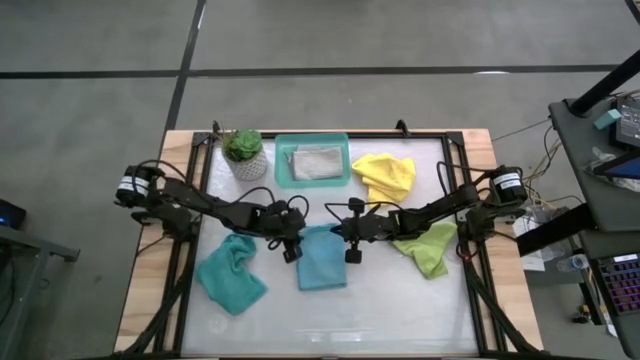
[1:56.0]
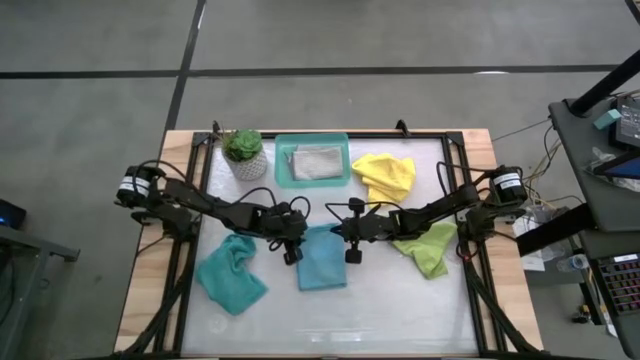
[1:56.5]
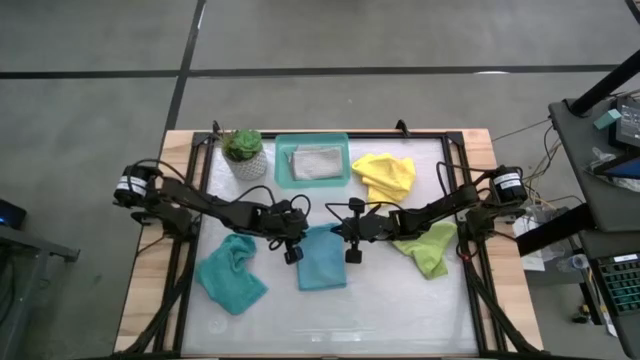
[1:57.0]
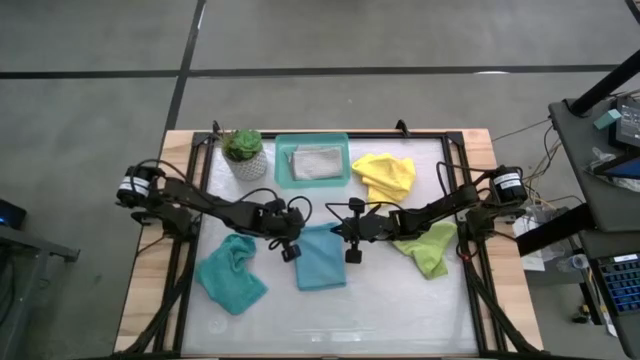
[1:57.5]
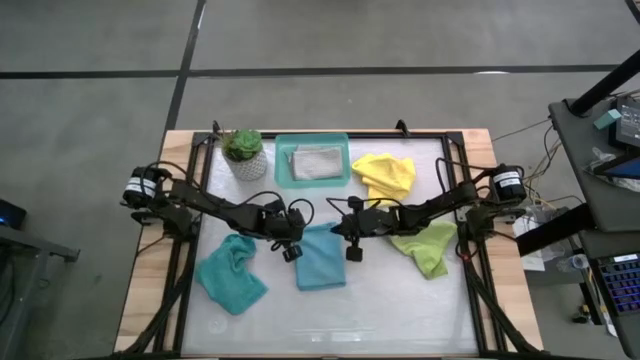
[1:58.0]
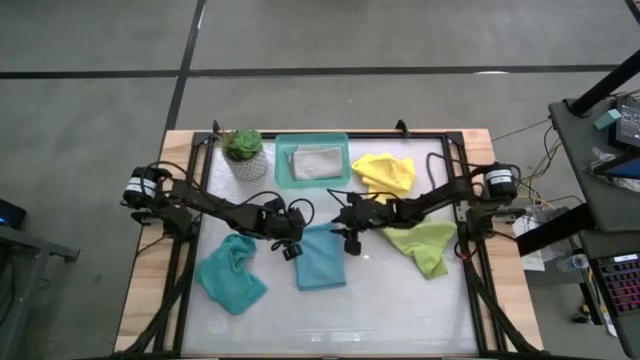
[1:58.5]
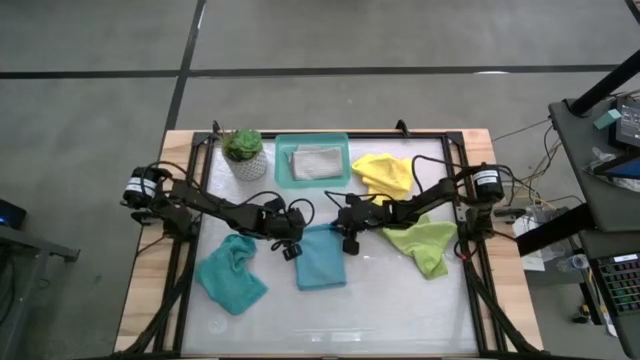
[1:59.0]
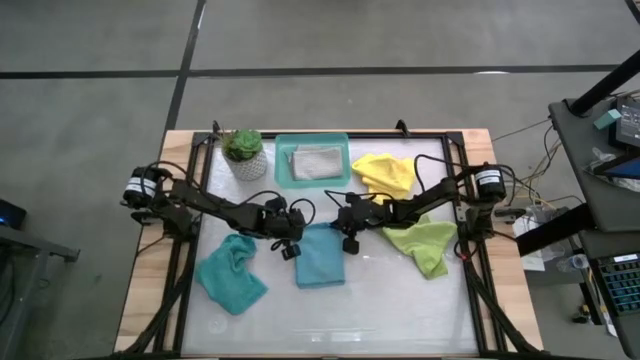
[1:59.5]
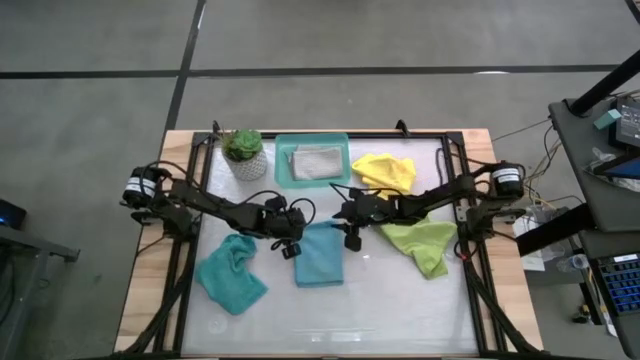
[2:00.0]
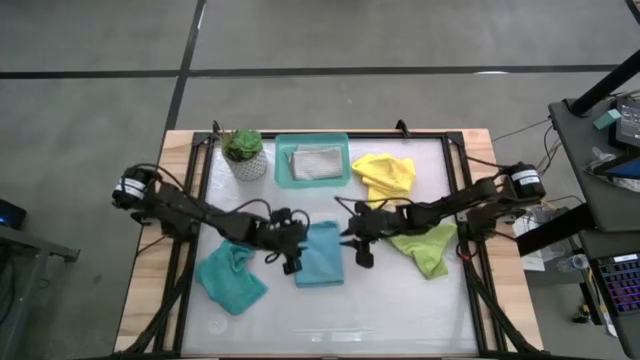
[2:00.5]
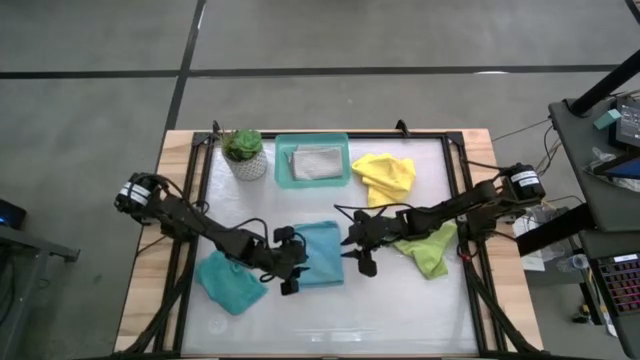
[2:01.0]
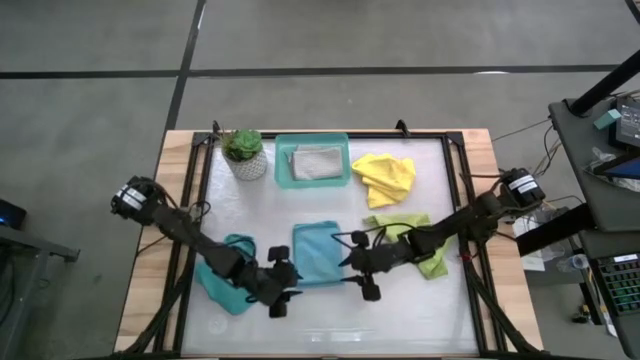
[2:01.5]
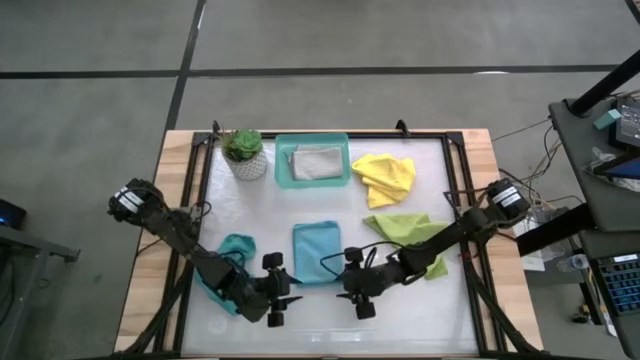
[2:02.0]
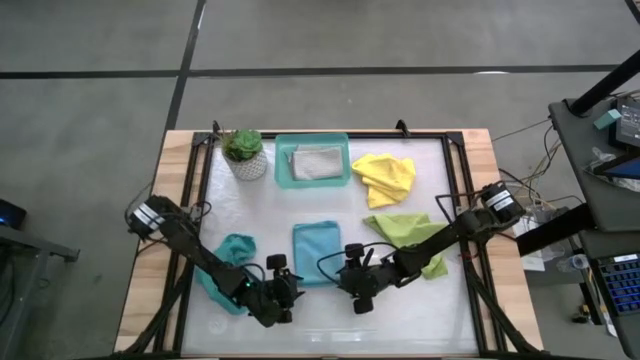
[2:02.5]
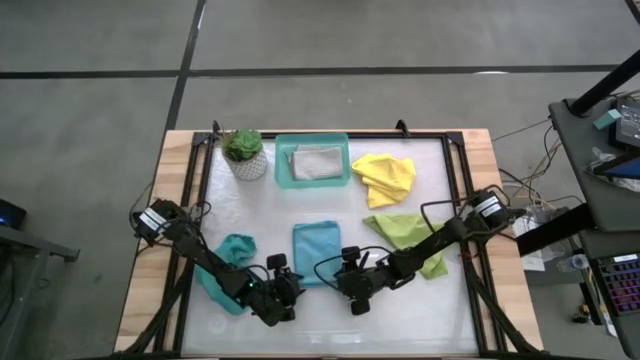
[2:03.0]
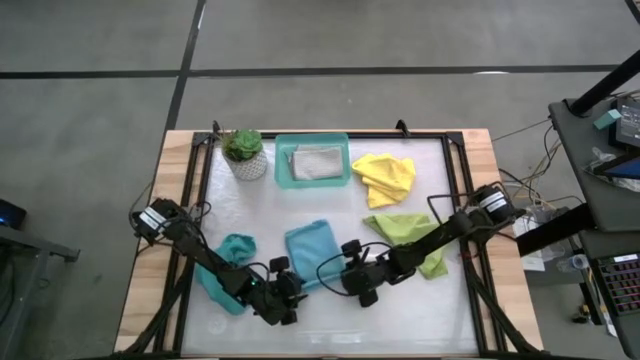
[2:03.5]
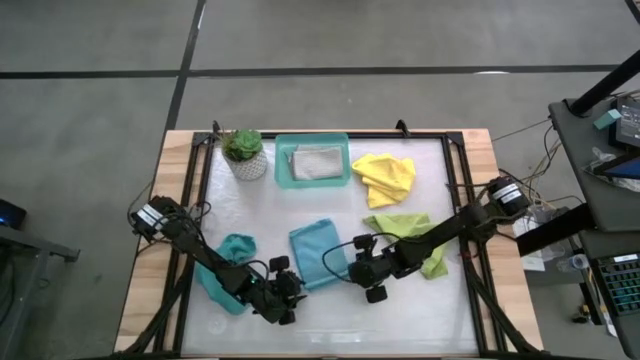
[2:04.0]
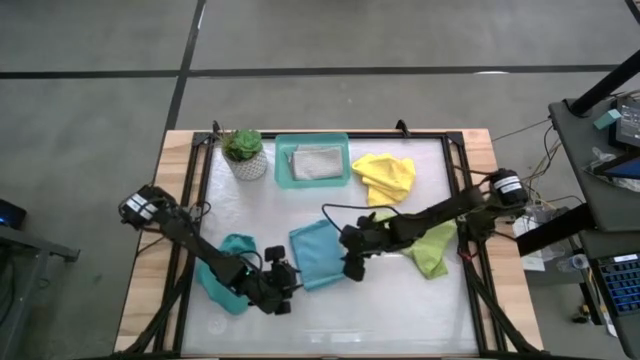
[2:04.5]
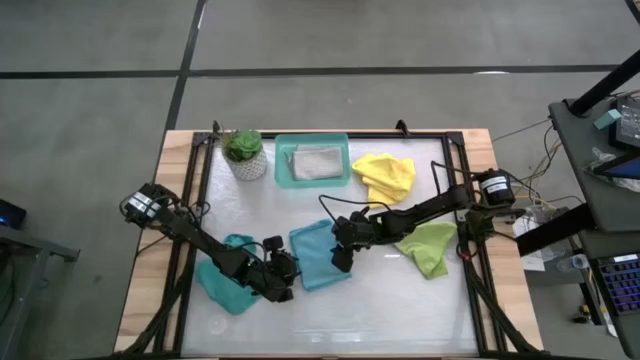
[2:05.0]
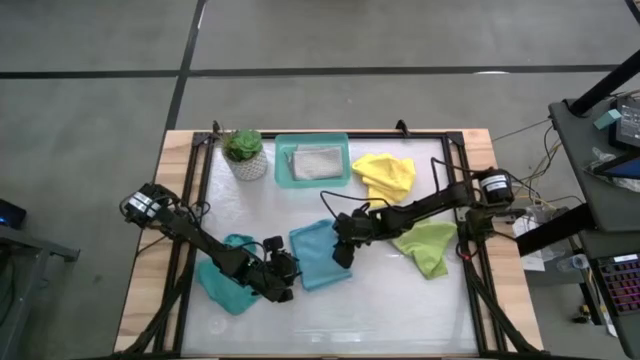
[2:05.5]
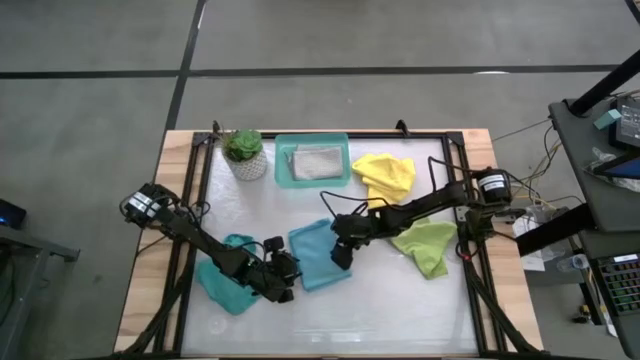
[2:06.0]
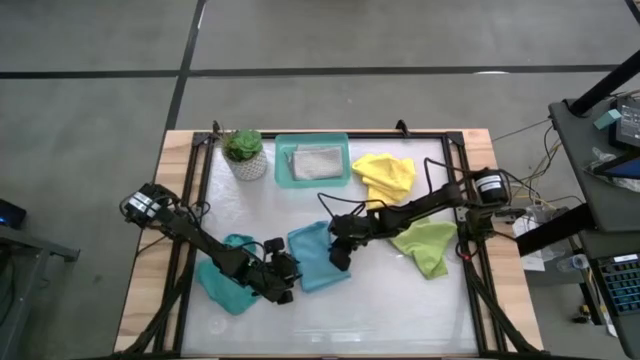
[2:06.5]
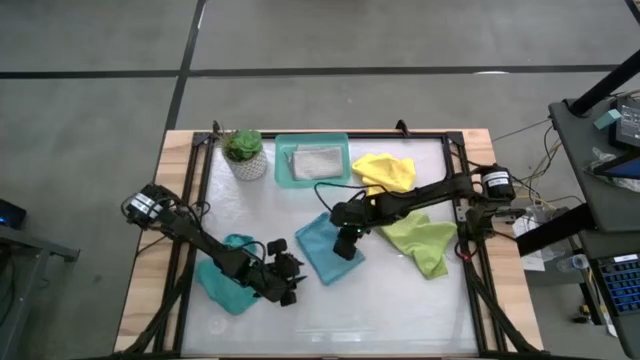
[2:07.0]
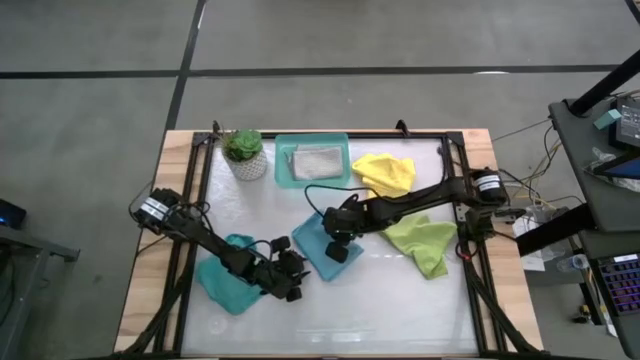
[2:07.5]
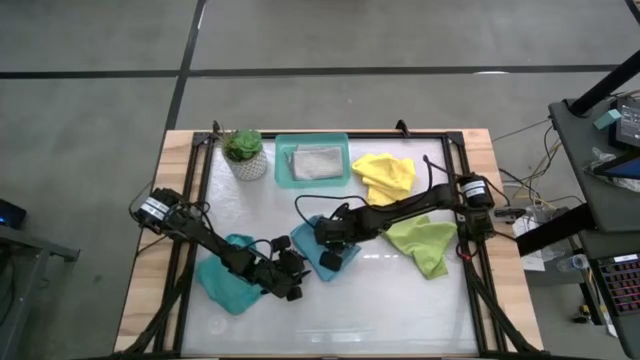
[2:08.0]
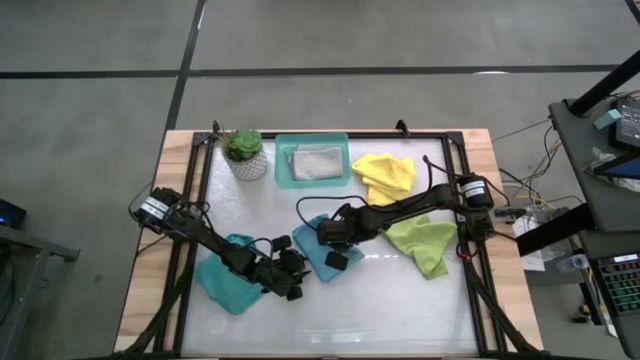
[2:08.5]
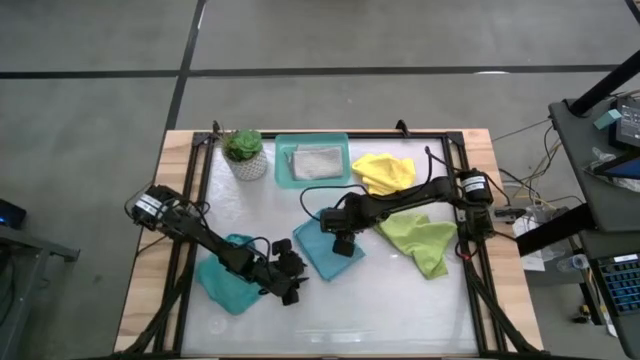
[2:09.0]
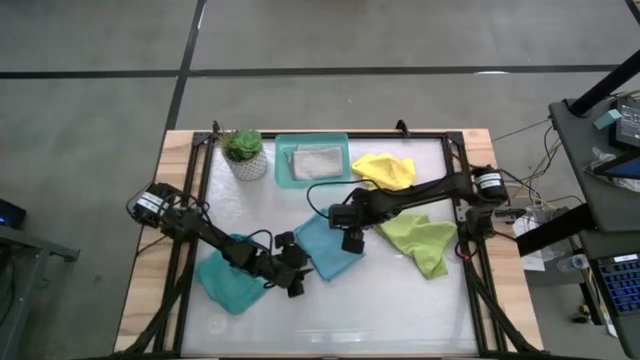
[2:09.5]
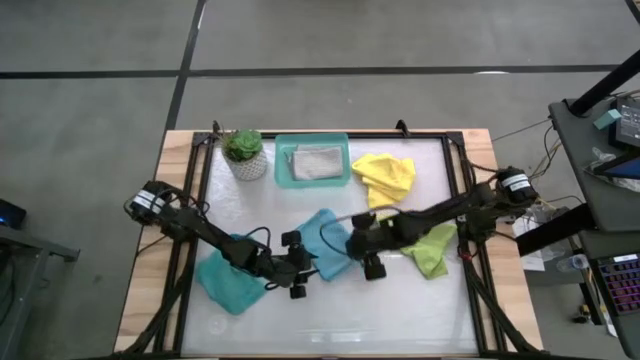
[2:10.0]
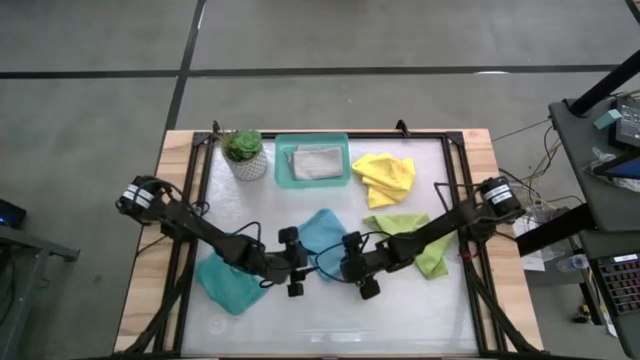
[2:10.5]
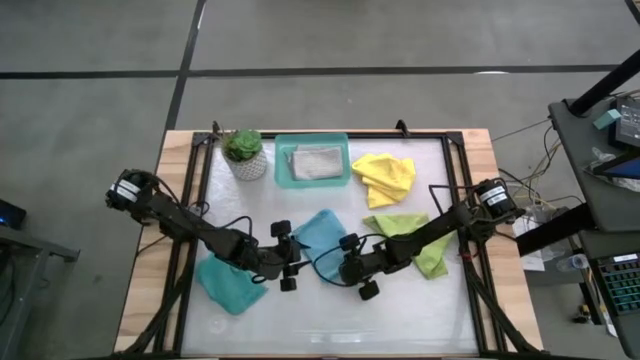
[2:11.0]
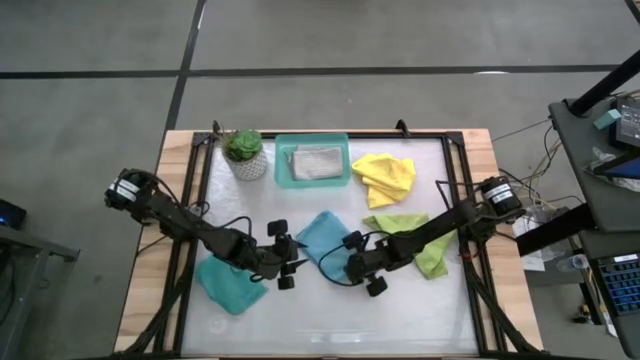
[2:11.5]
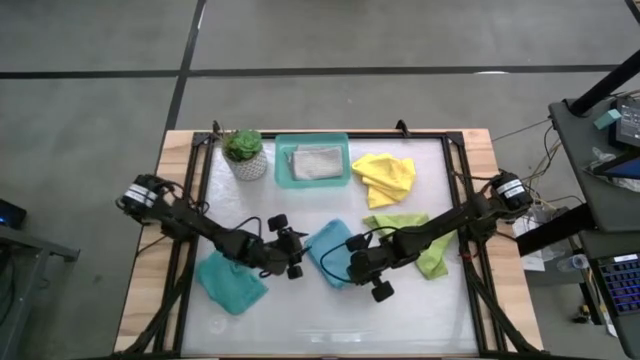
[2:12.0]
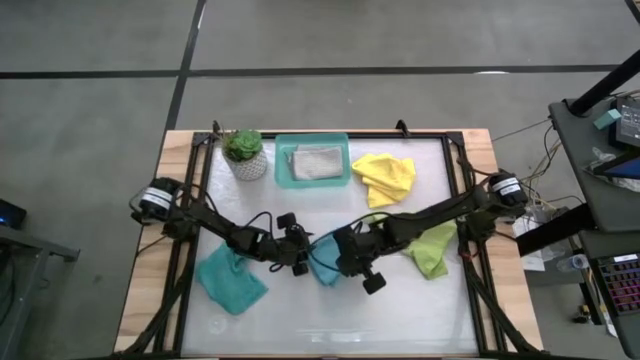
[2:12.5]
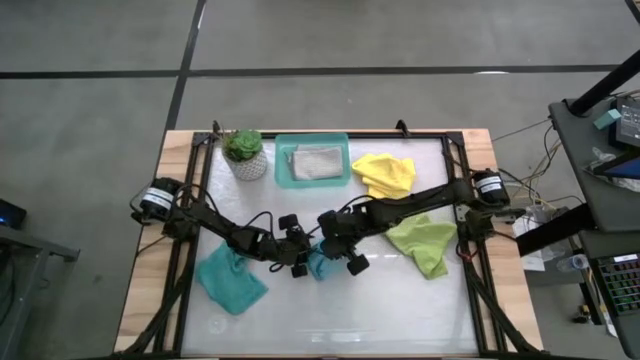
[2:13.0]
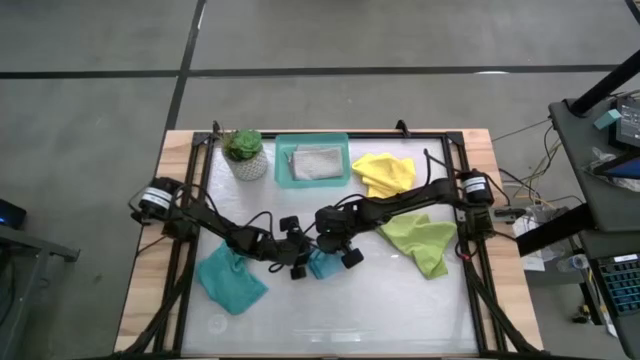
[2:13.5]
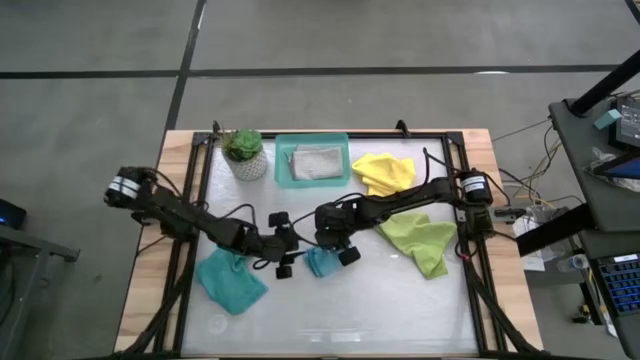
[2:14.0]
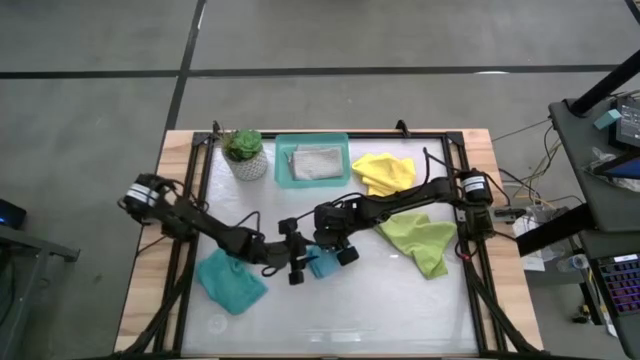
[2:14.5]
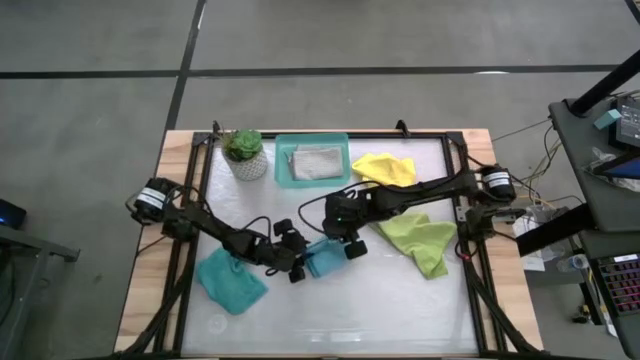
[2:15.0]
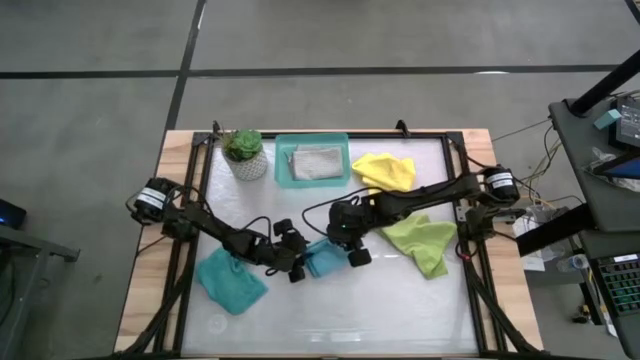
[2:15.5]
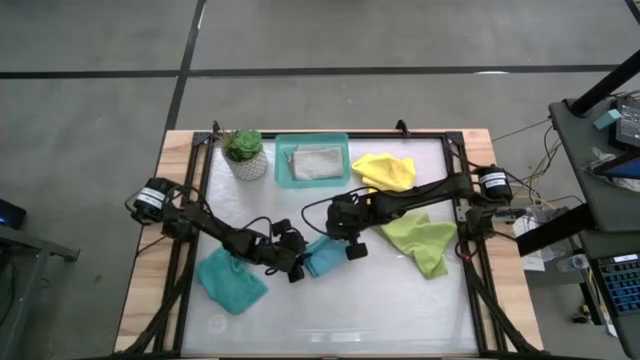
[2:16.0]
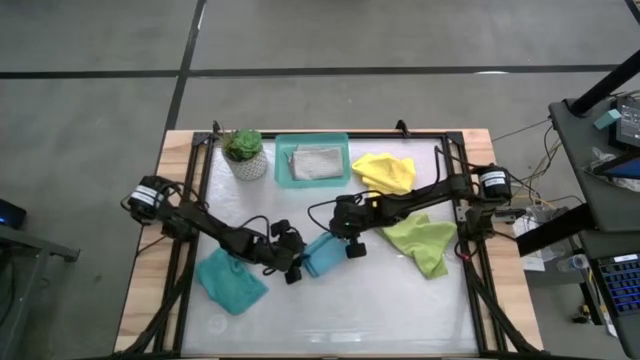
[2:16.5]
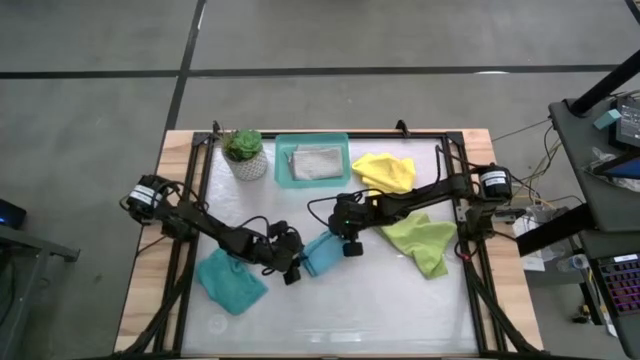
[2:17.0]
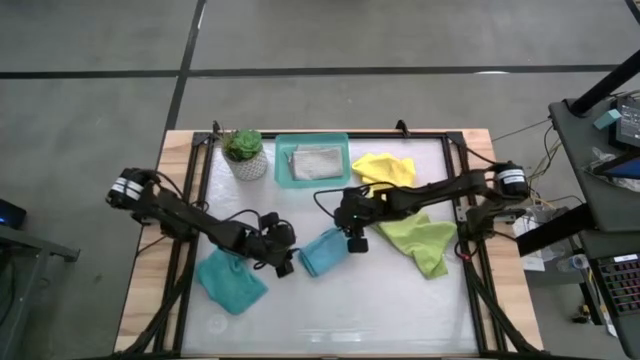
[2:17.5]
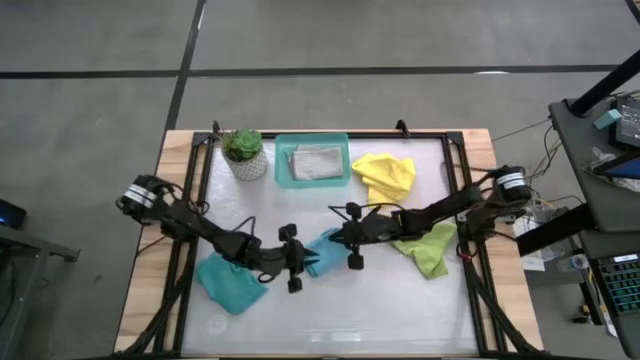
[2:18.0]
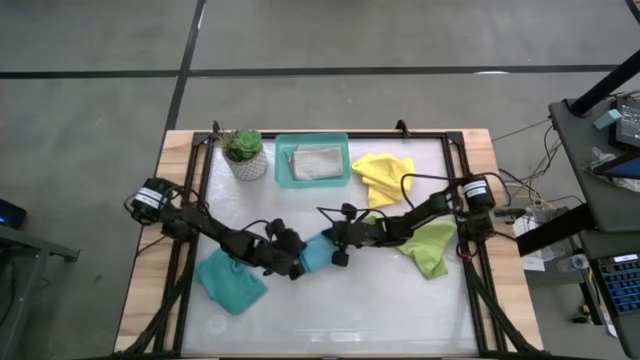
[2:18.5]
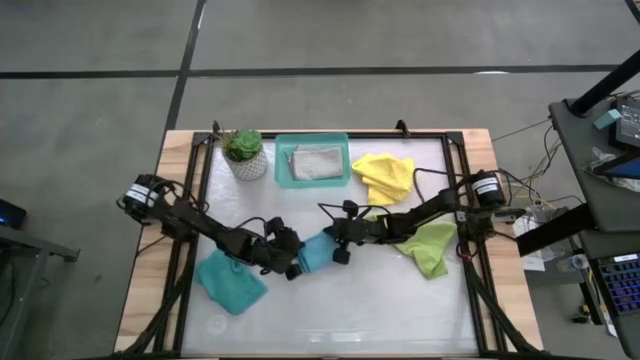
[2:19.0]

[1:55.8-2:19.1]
Task: Fold microfiber towels
Fold the blue microfiber cloth
